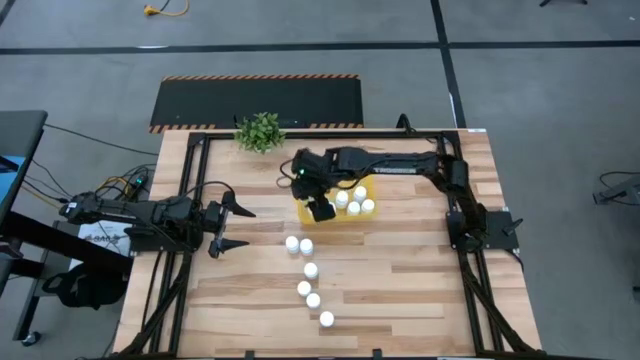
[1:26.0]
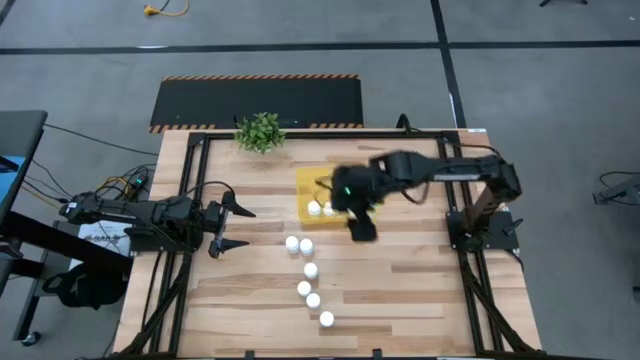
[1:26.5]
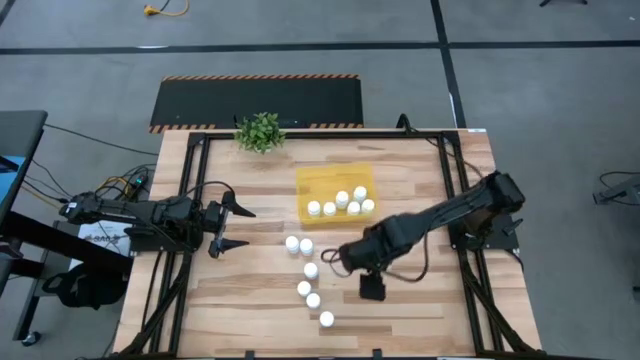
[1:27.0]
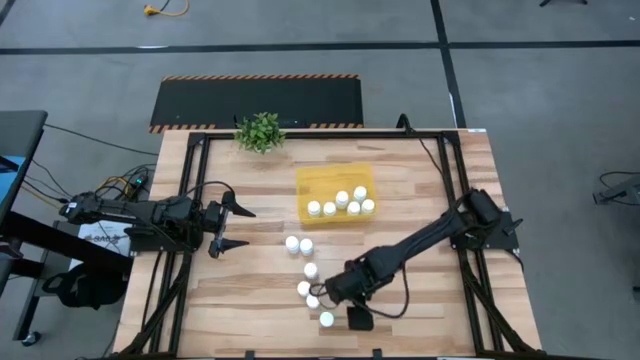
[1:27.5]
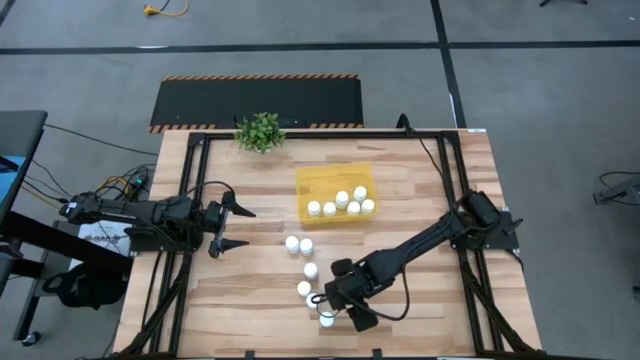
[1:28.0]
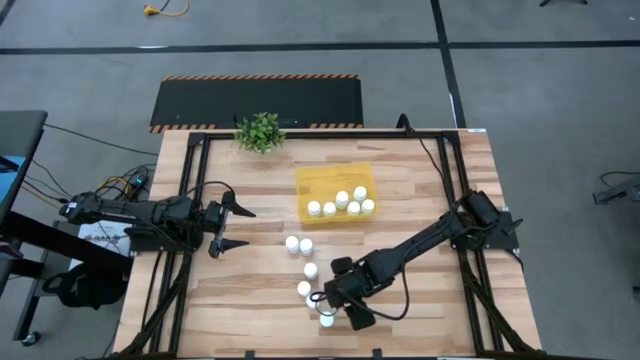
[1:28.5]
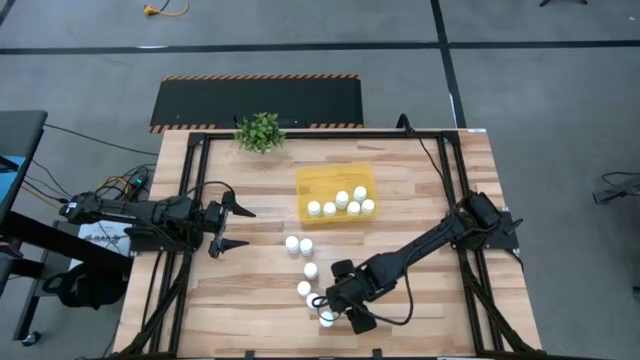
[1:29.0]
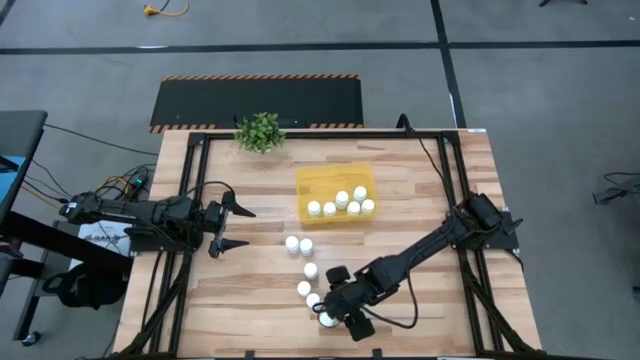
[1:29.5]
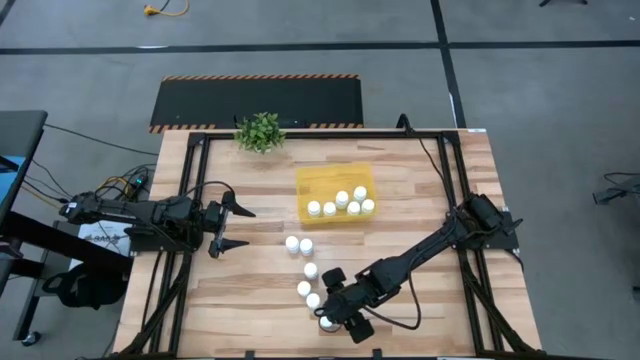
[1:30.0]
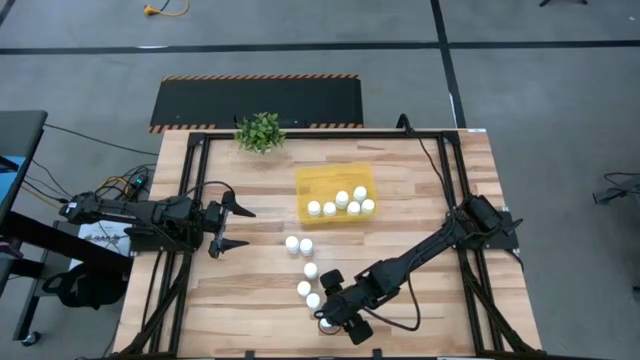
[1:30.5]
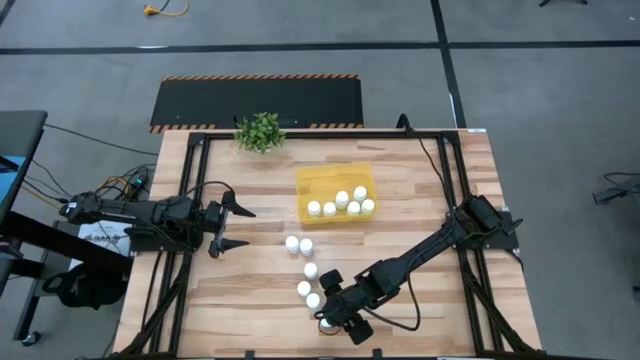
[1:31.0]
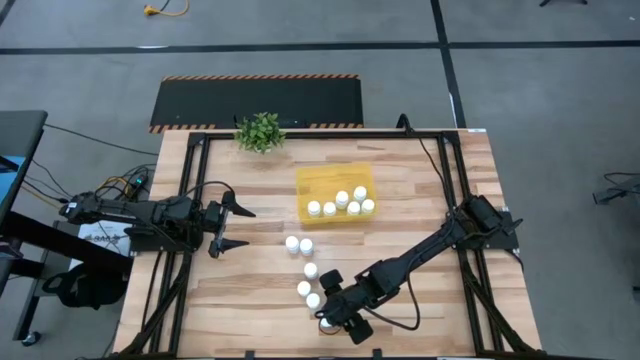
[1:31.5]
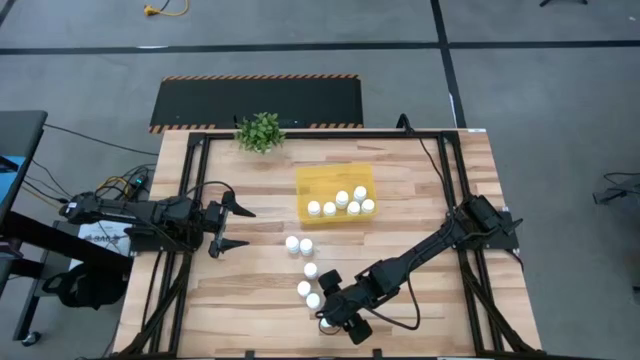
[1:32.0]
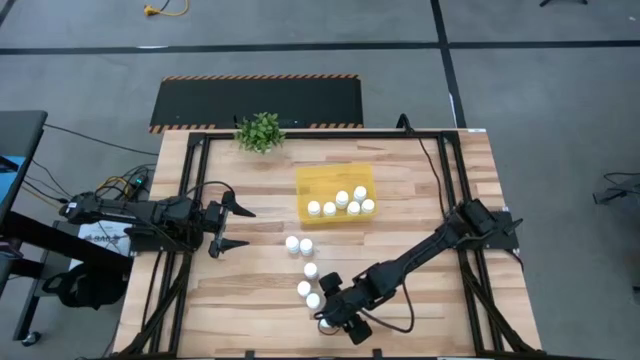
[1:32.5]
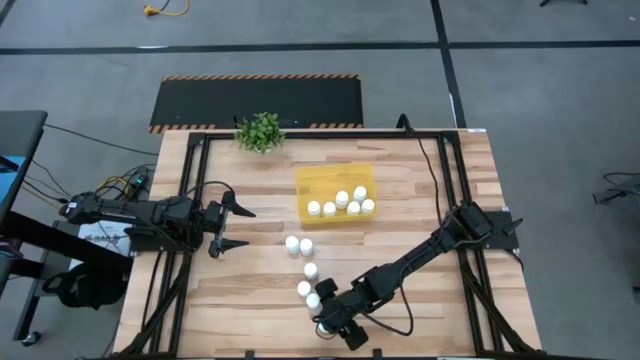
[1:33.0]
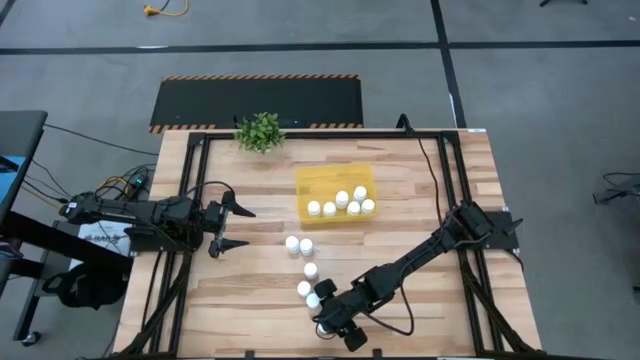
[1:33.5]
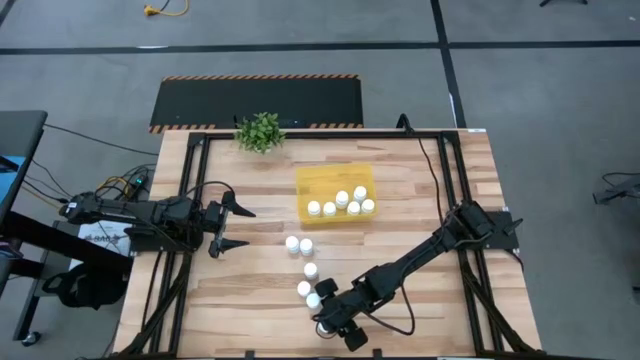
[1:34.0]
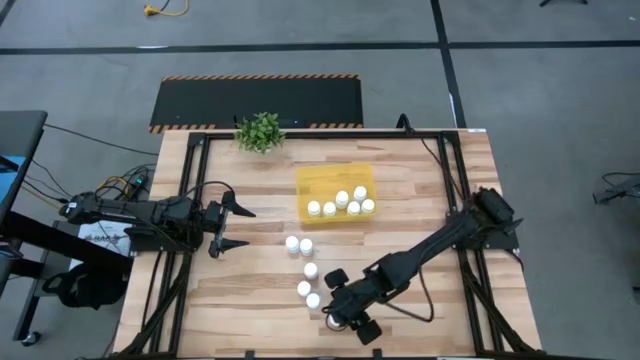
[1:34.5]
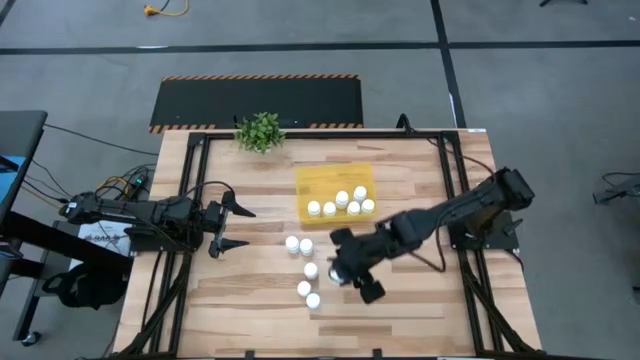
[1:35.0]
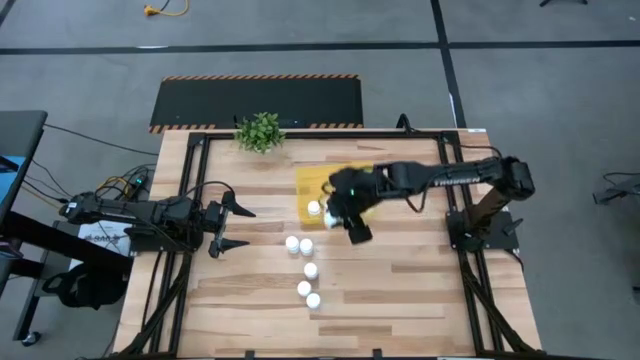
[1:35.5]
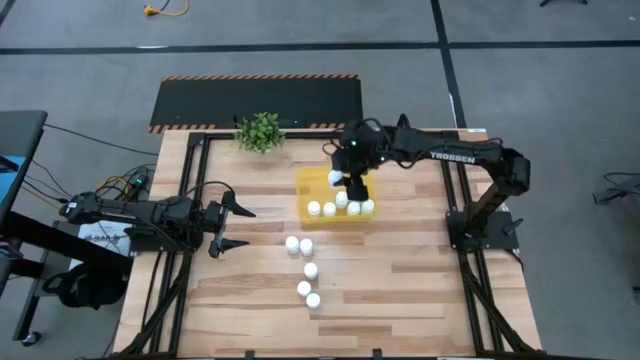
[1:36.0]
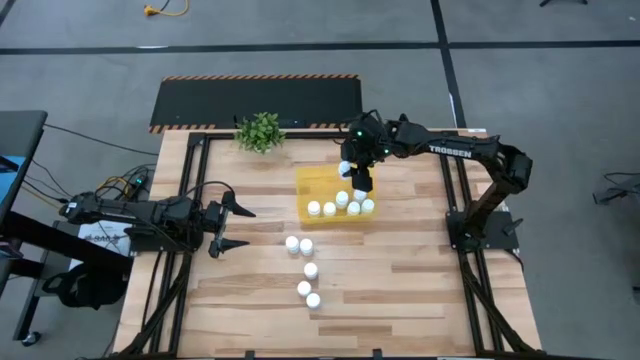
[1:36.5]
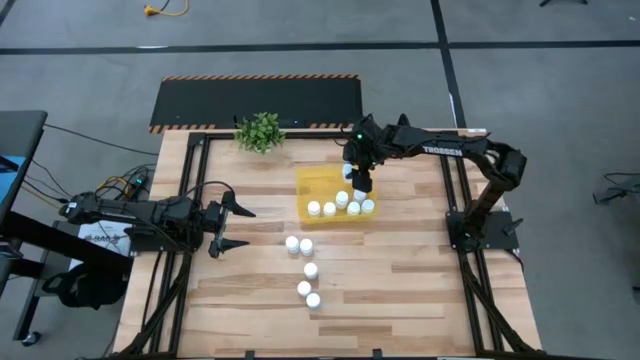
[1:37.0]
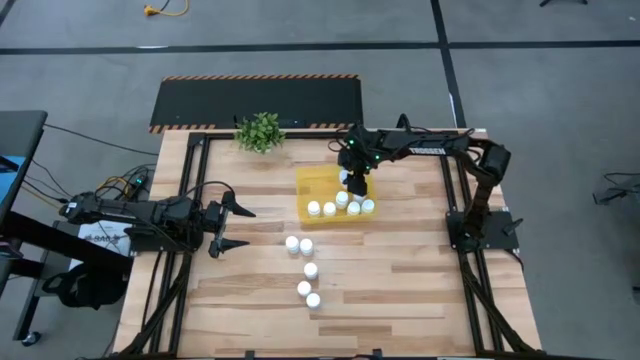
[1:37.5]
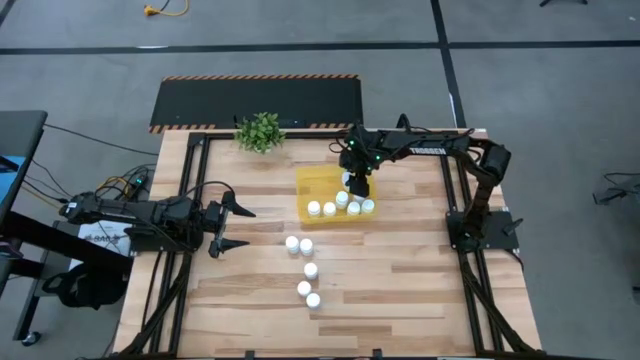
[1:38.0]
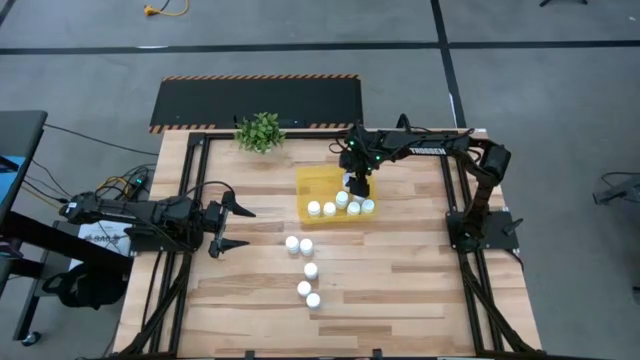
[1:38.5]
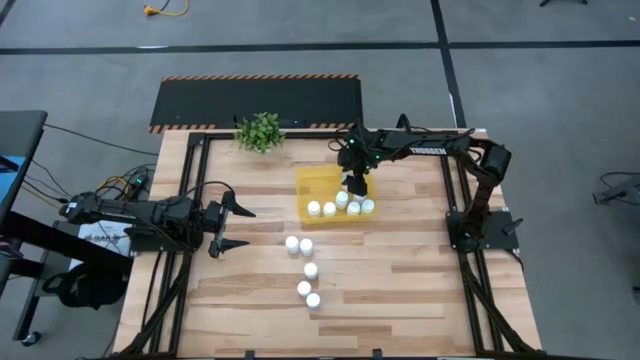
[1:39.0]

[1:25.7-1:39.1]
Task: Pick and place pill bottles into a basket
Put the white medicine bottle into the yellow bin

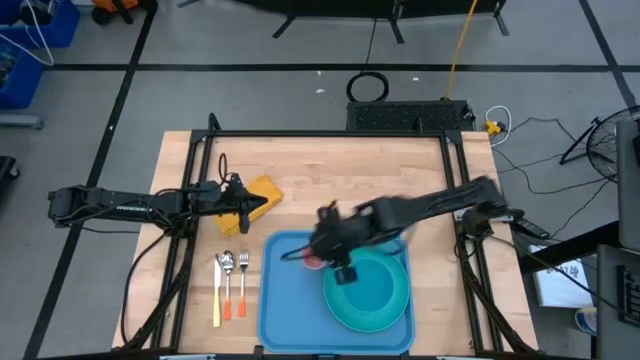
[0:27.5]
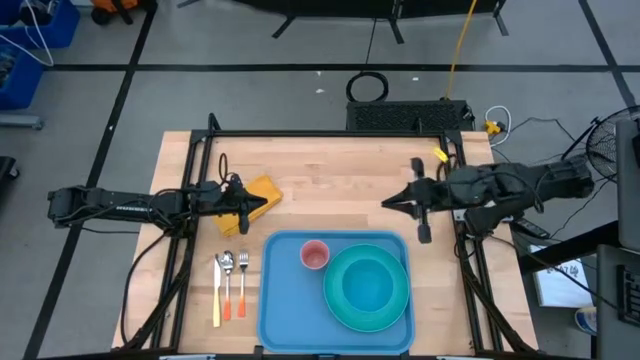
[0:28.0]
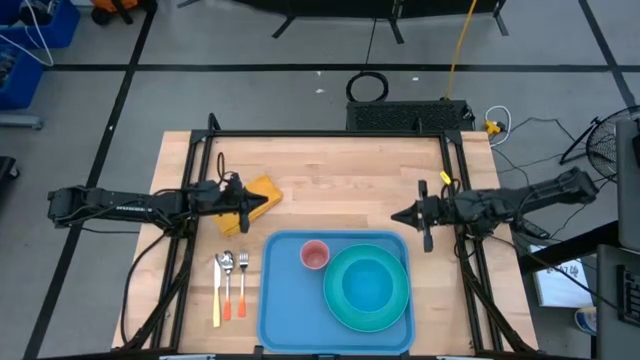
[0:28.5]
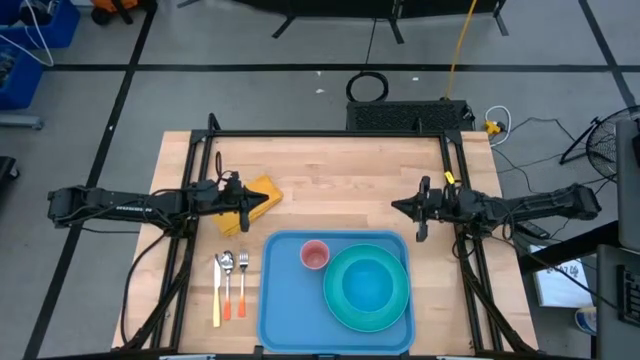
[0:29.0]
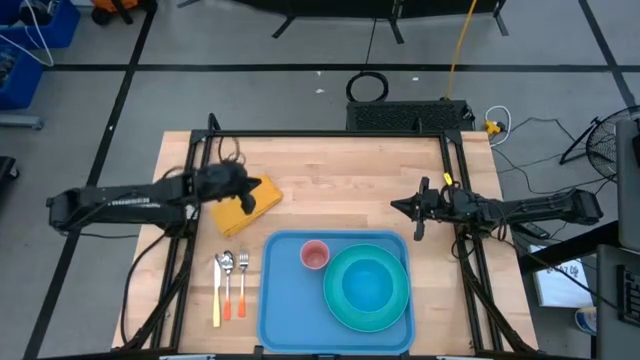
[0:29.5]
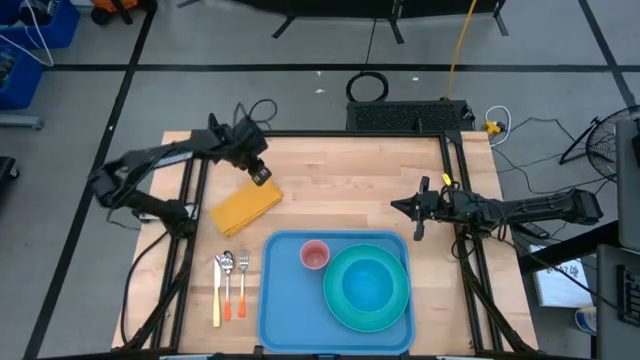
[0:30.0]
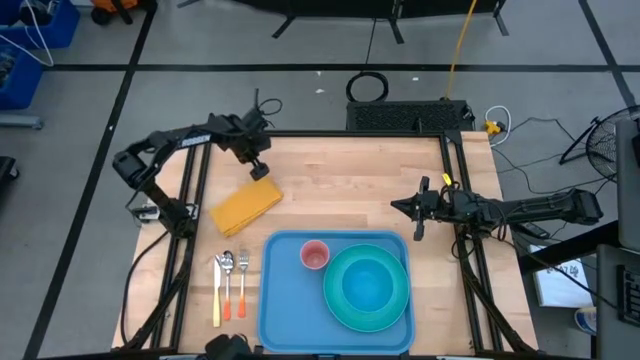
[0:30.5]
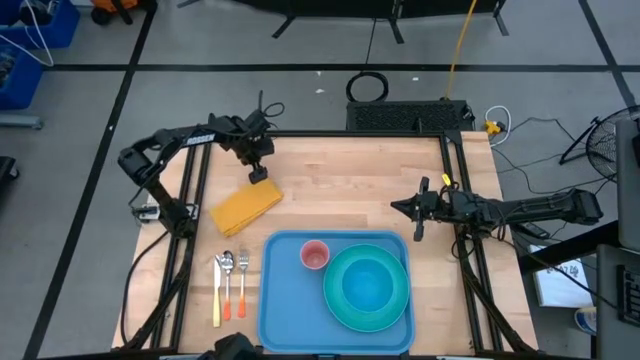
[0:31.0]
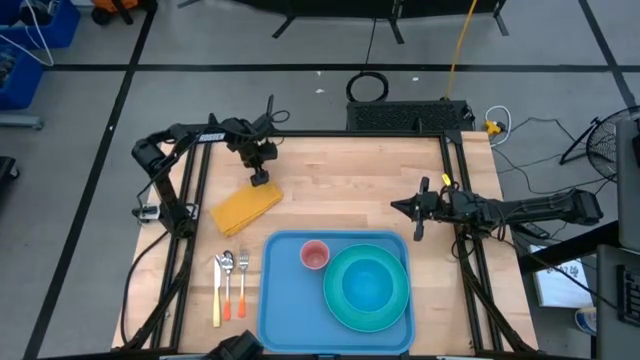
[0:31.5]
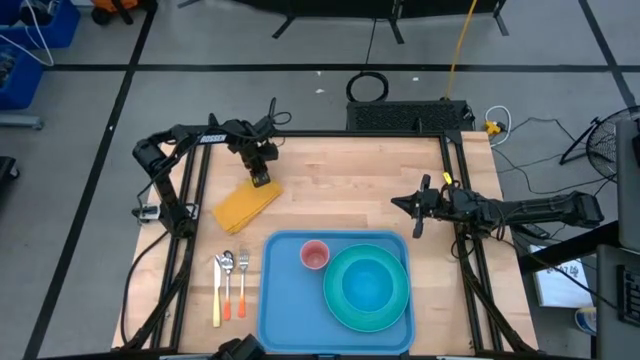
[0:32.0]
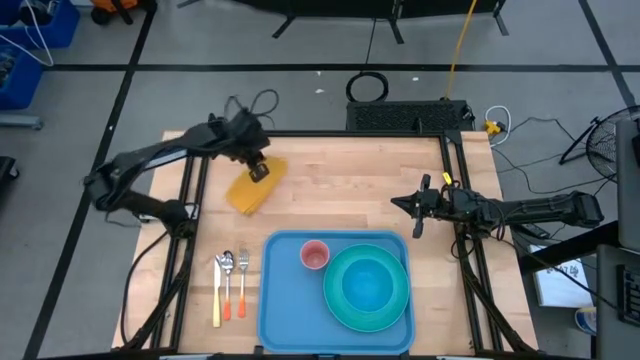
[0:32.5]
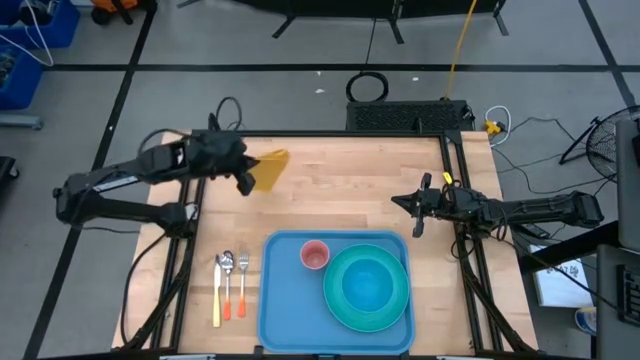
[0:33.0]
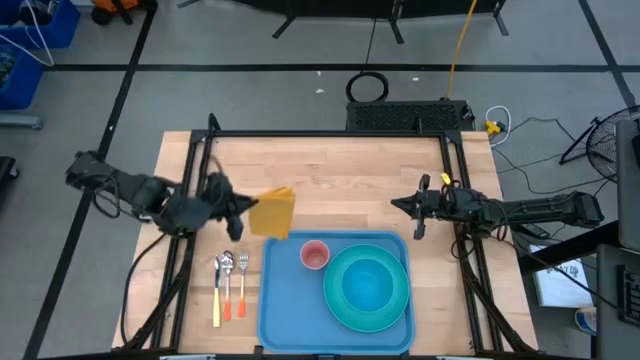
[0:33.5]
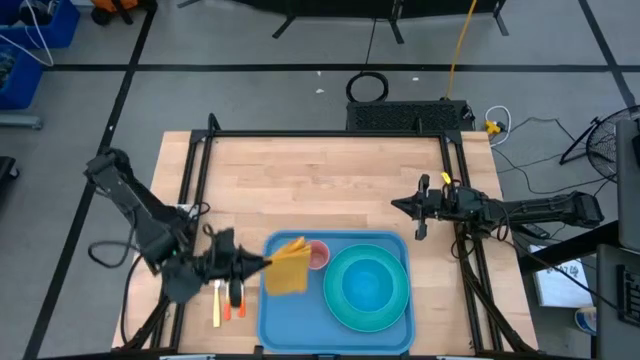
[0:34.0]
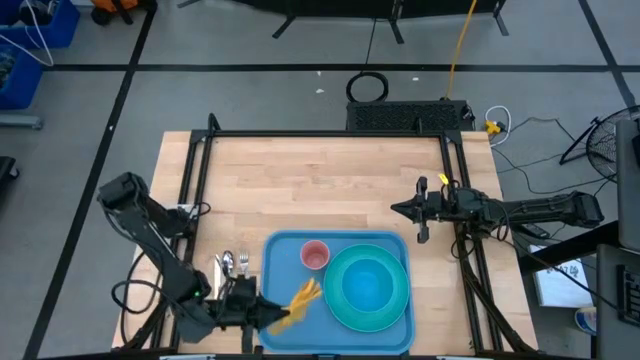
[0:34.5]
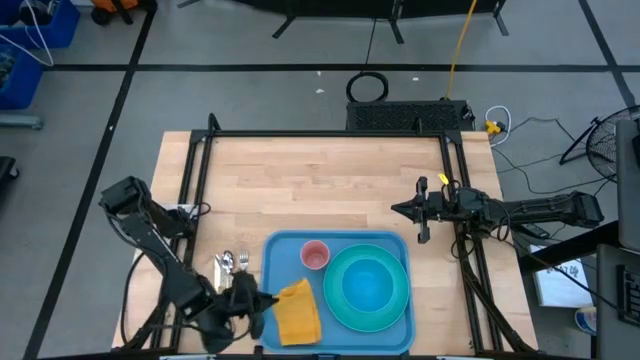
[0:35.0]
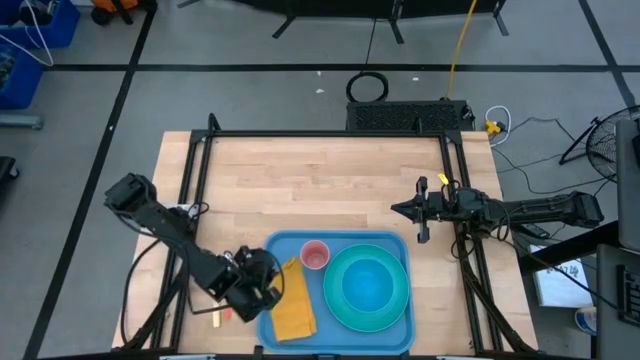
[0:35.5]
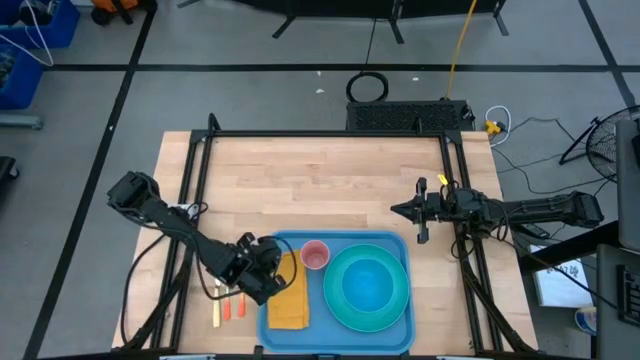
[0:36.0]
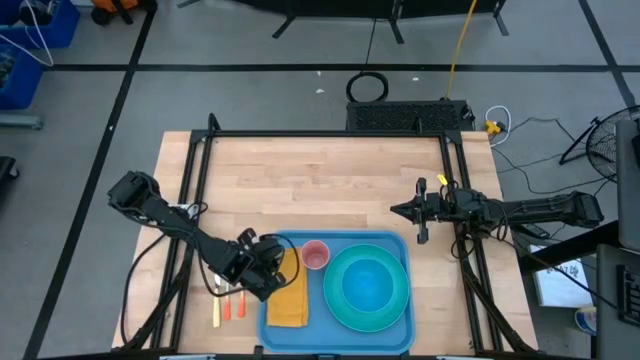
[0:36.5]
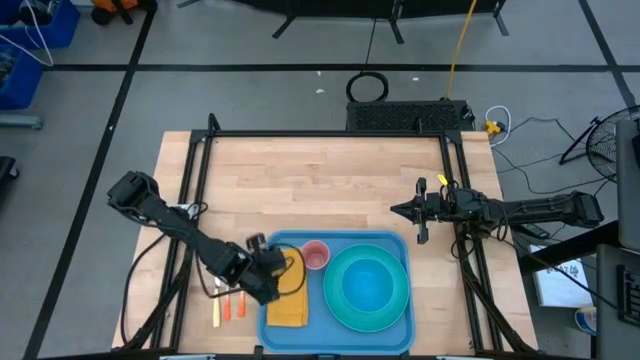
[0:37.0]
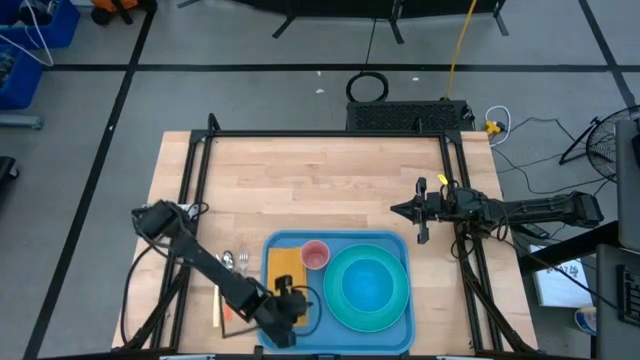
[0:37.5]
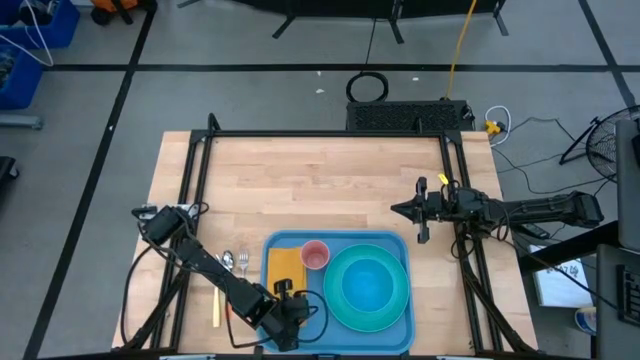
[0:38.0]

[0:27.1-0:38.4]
Task: Set up tray
Put the yellow napkin to the left of the pink cup on the blue tray
